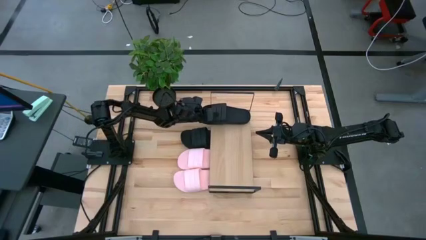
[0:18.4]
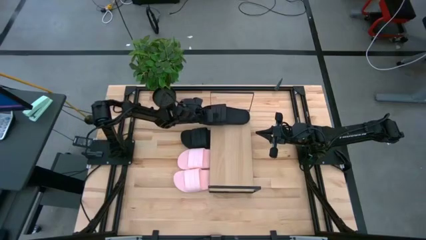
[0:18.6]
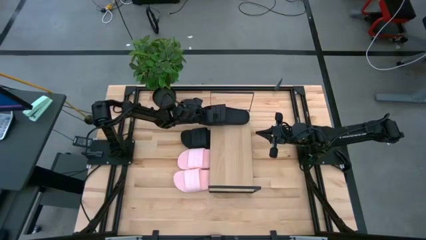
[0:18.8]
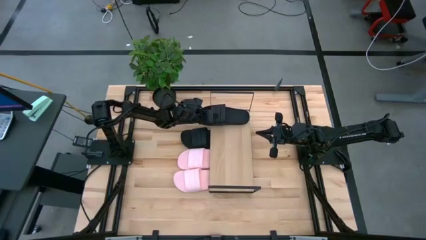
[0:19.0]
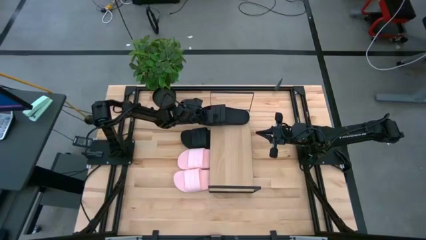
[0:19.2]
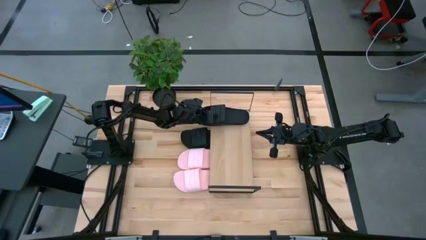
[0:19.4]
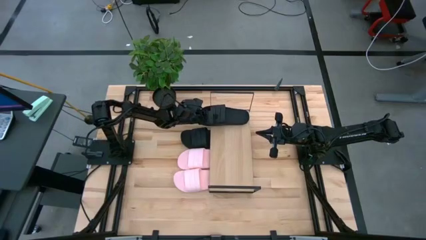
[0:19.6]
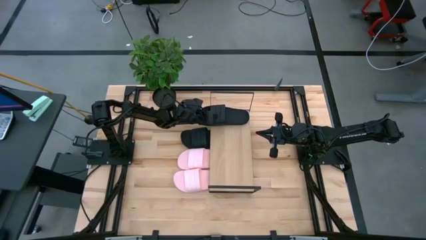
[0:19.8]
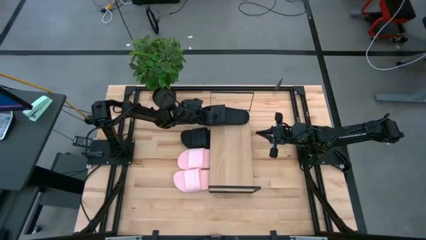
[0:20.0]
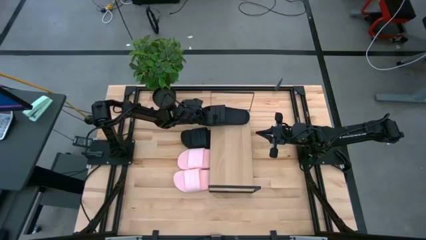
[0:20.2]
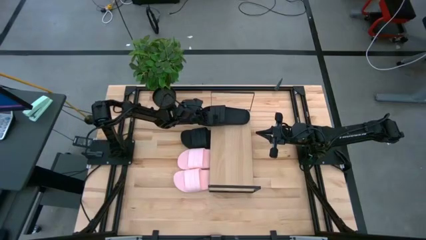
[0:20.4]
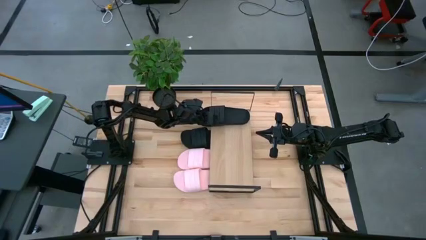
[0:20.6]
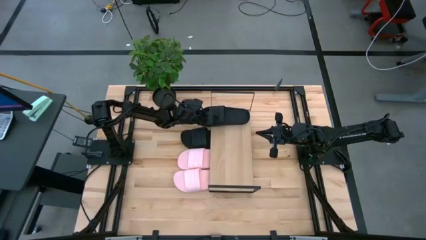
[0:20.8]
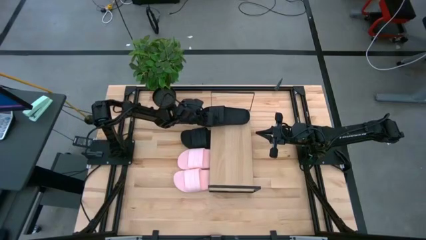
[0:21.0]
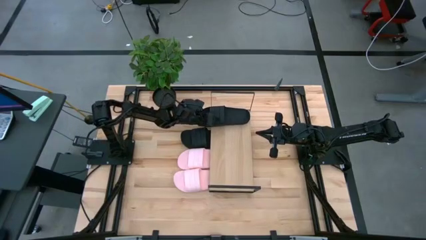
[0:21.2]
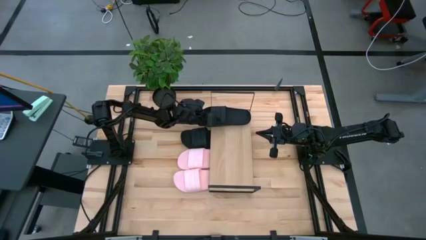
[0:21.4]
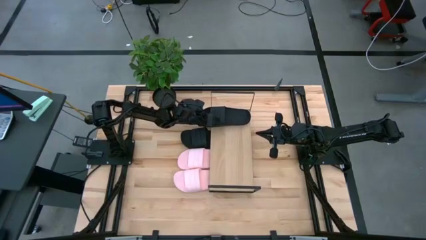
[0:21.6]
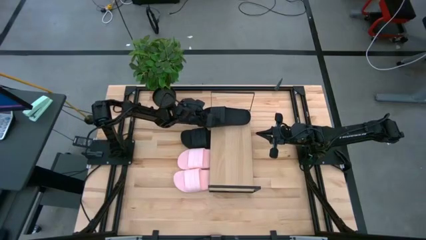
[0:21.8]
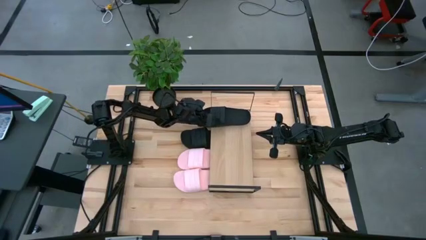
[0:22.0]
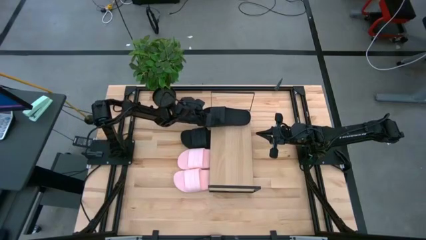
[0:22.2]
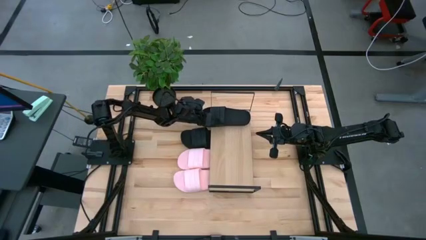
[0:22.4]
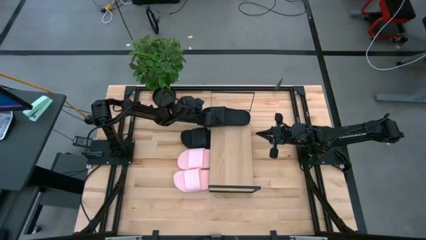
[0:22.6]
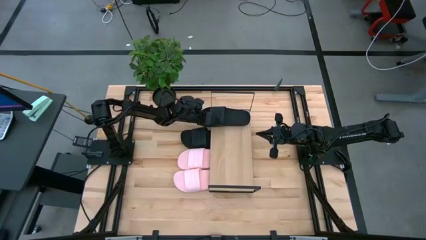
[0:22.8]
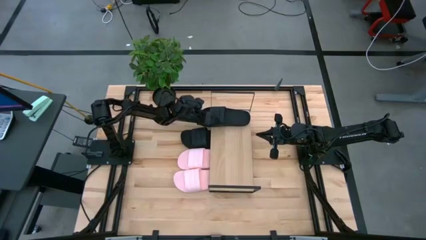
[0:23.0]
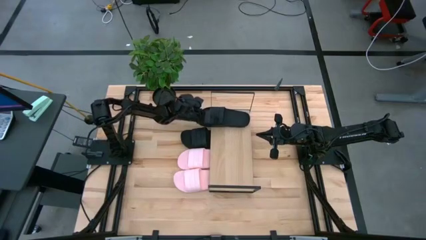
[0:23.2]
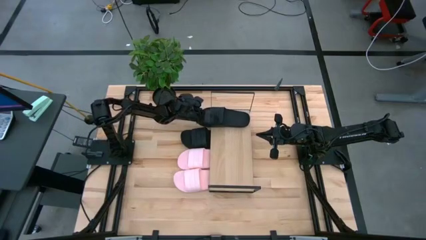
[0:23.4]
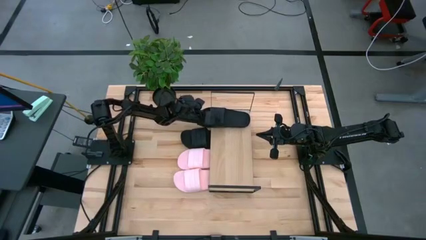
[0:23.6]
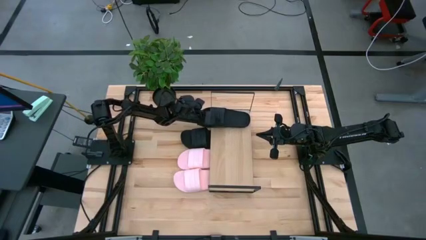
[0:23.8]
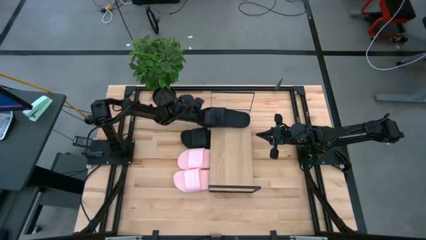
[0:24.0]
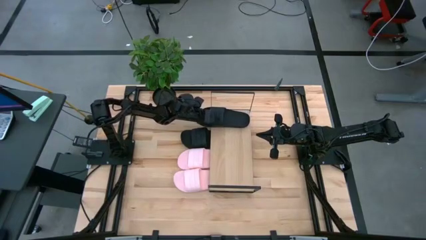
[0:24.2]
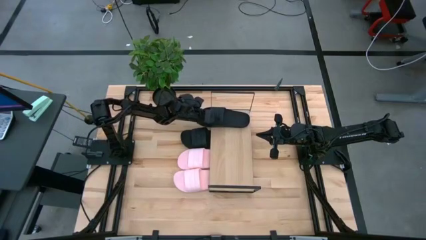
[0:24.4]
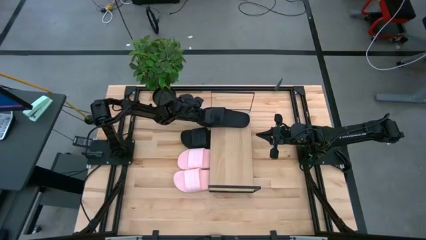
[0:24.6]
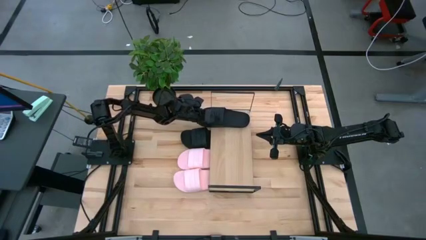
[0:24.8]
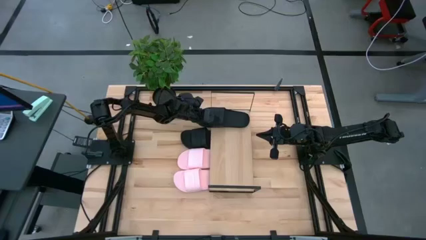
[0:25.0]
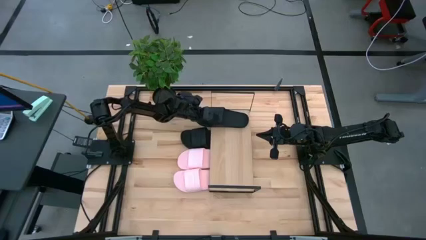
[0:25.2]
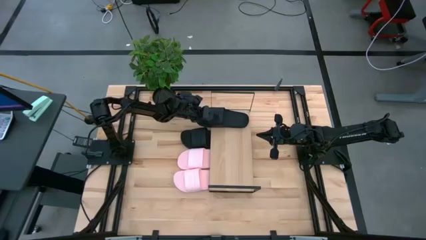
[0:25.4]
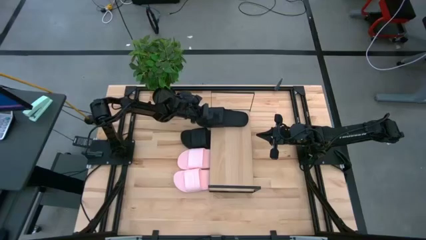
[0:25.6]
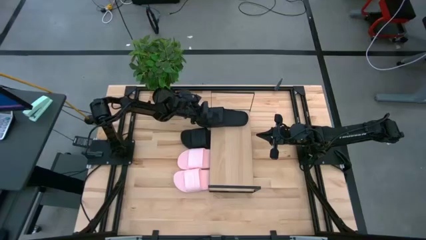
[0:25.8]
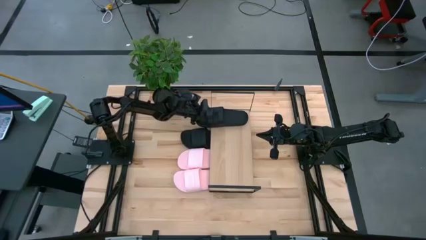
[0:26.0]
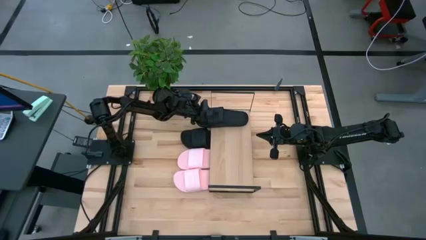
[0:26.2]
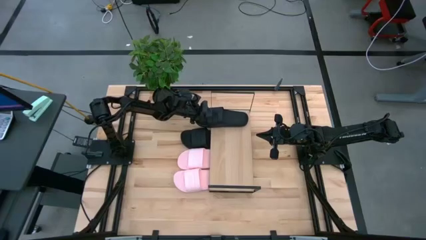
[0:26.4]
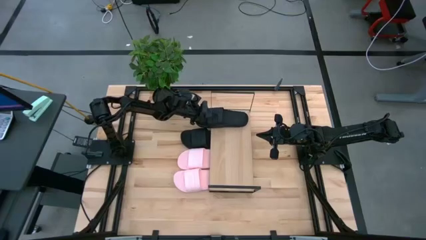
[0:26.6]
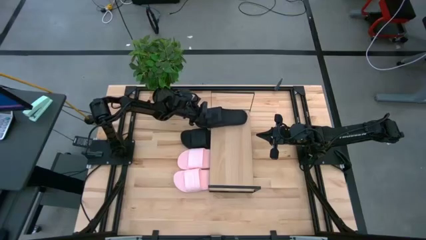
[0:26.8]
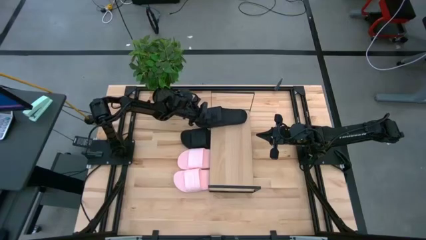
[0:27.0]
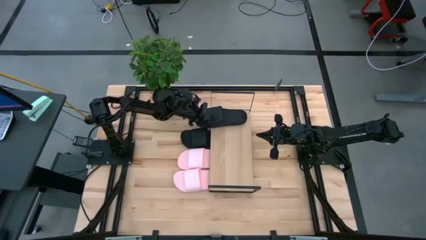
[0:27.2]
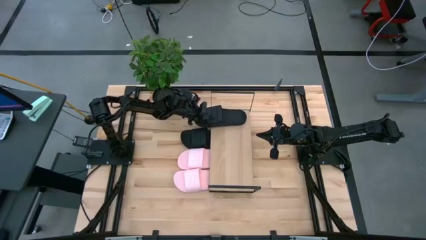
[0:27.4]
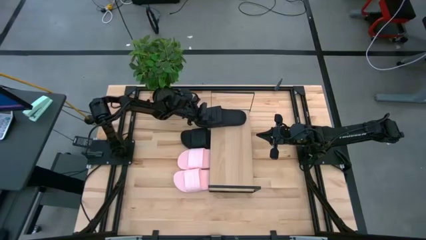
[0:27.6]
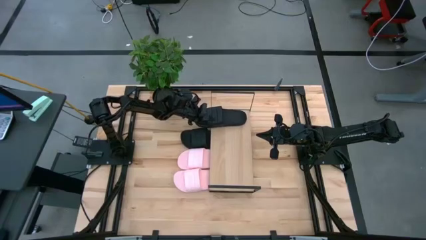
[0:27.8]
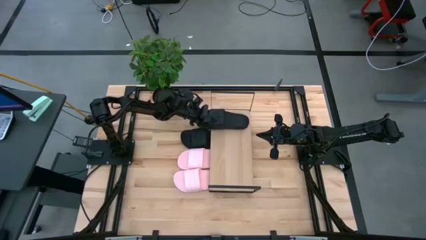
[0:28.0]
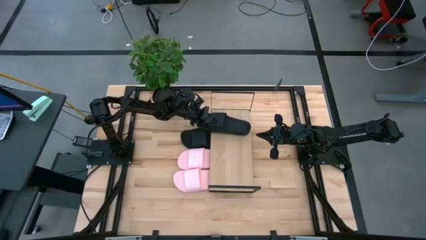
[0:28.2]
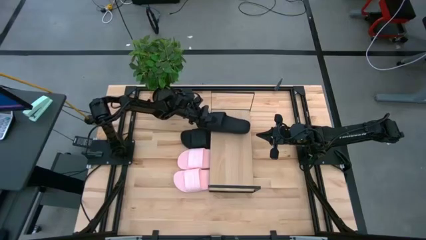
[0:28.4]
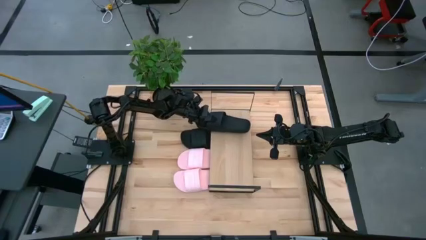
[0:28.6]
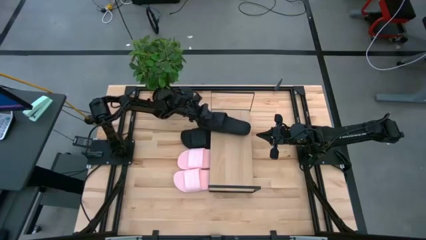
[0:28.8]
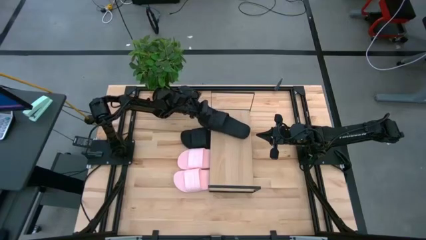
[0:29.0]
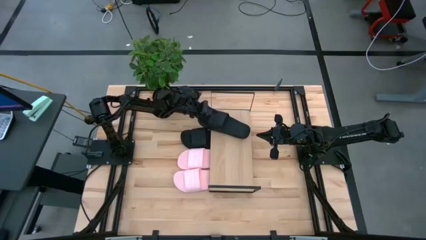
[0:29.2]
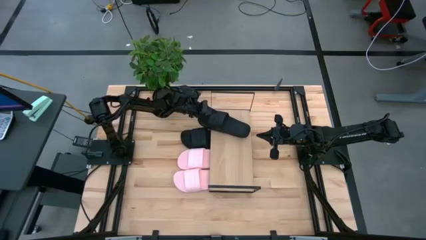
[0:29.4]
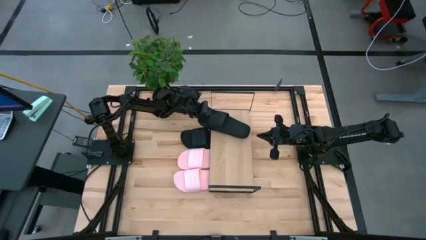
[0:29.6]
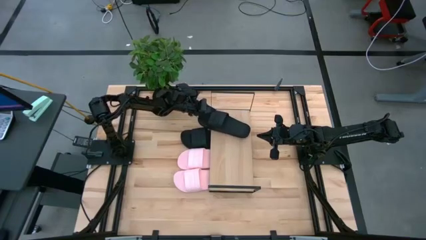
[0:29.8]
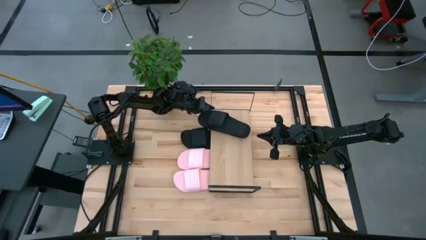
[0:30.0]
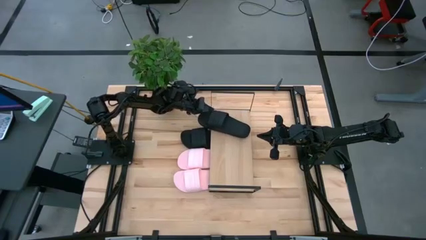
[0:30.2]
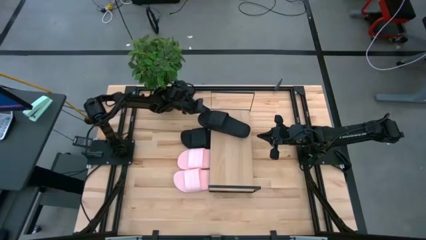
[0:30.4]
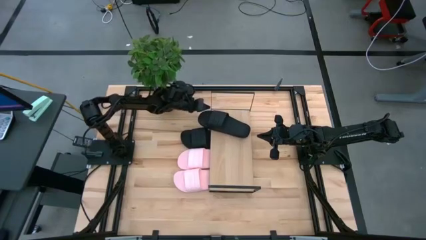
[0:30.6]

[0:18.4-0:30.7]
Task: Pick and place slides into the shelf
Put the top black slides on the shelf

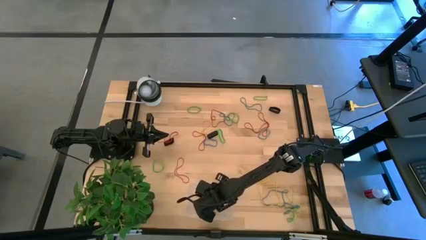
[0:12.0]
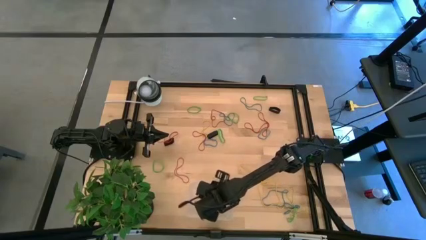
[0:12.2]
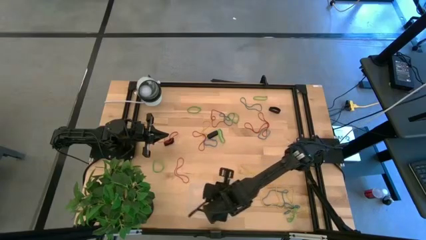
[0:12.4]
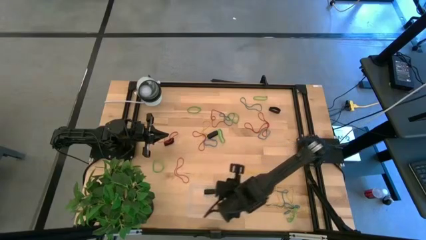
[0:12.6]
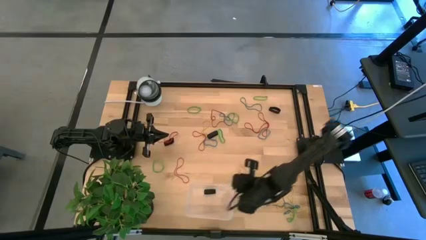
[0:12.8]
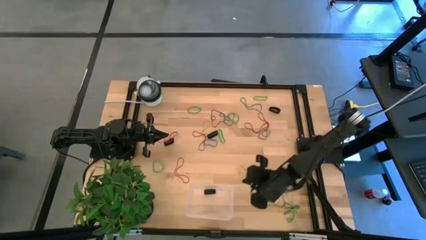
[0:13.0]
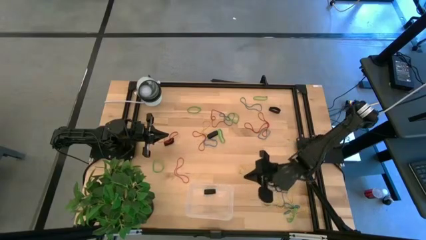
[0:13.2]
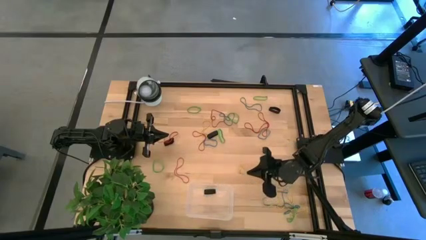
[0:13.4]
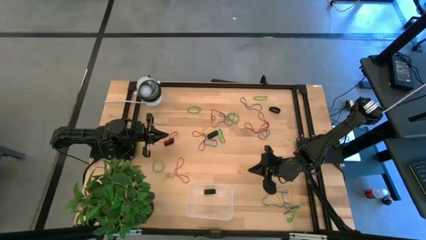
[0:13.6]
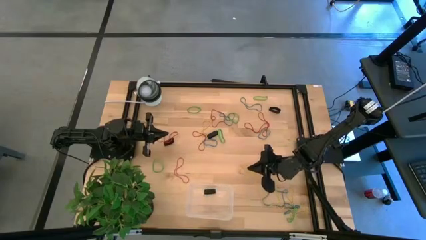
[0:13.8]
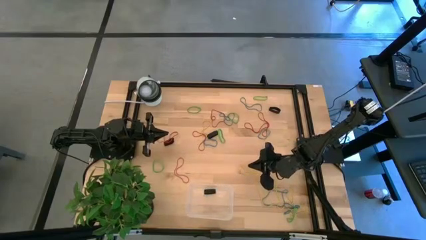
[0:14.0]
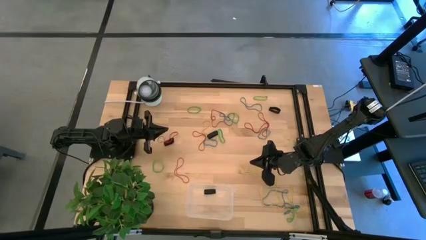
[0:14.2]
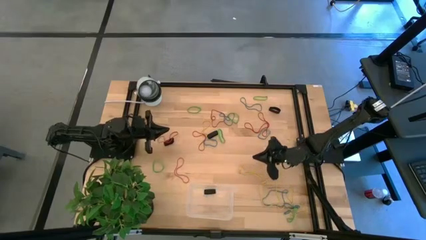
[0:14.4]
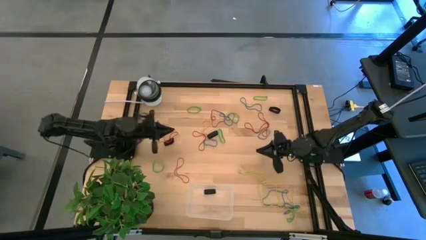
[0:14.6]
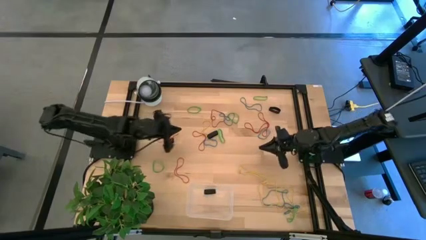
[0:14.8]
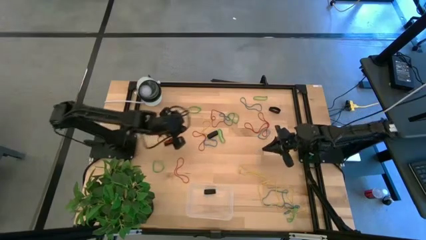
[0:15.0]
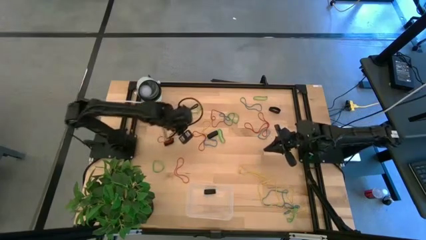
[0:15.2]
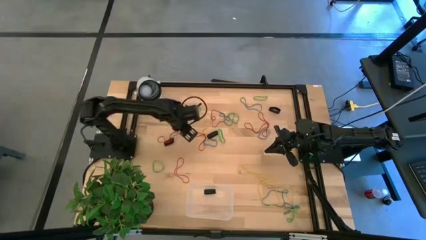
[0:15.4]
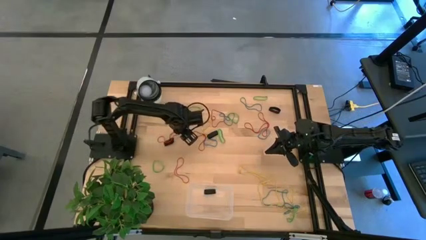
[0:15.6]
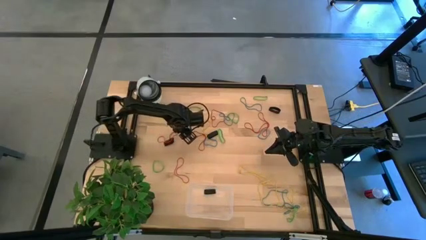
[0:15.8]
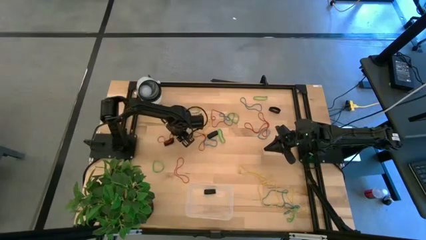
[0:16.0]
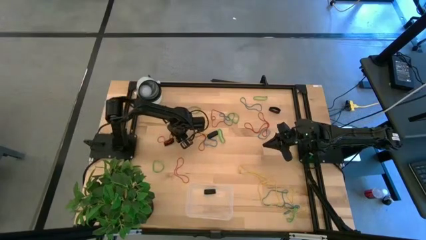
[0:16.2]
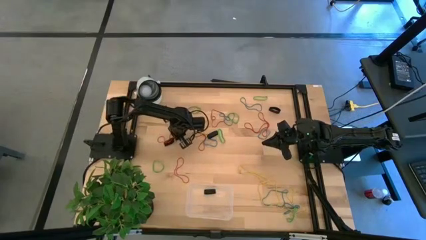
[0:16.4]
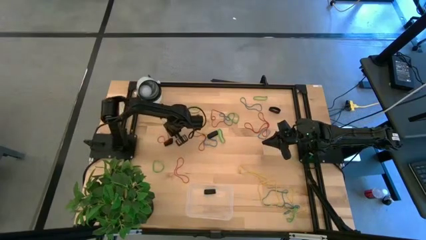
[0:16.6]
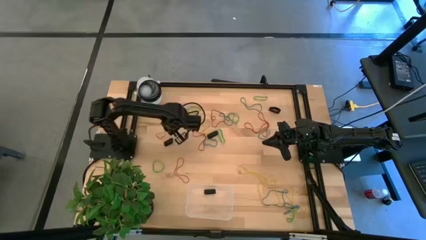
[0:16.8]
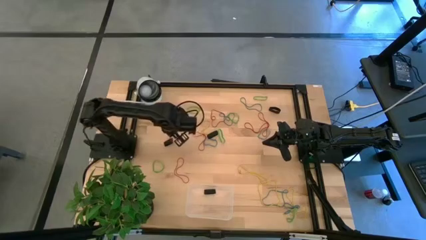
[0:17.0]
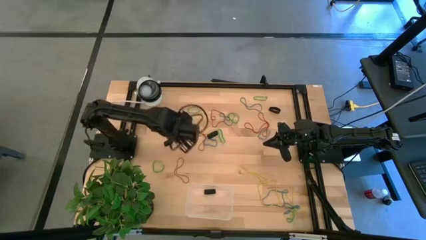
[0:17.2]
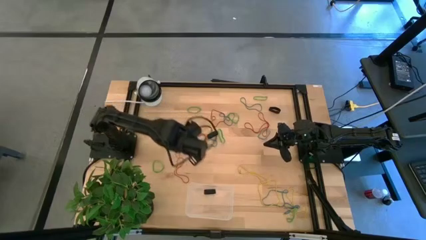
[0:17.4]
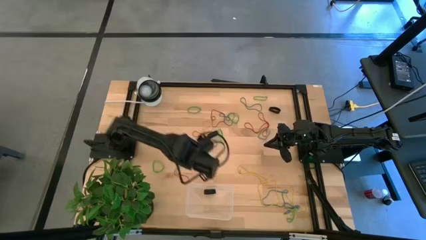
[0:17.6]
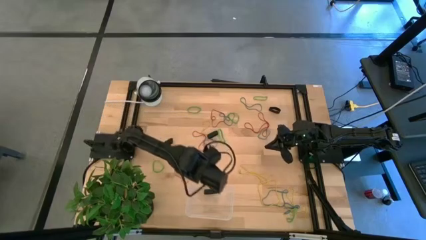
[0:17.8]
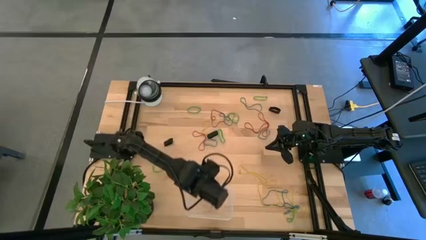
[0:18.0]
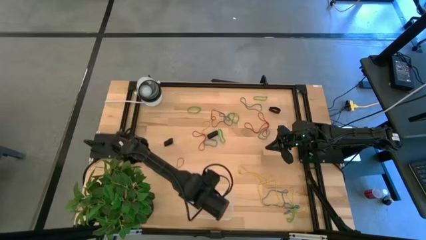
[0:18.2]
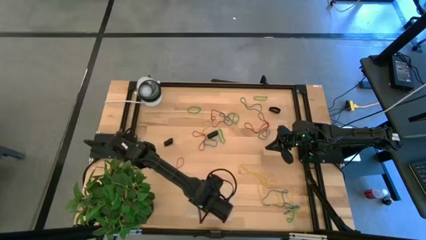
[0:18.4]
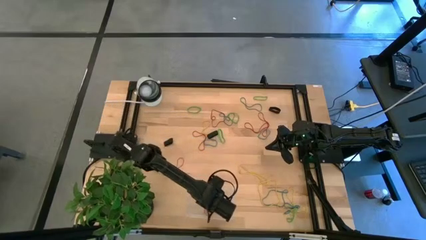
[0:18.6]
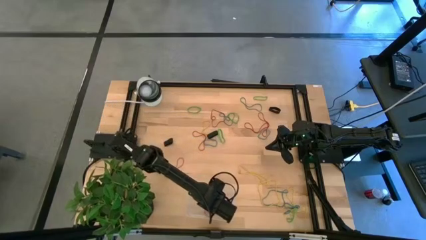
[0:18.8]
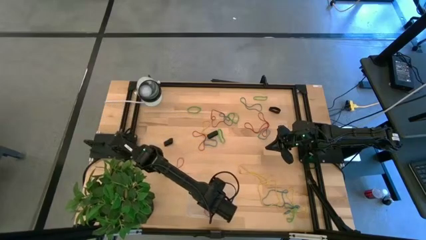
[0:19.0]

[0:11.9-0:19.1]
Task: Pick and place rubber bands into bin
Put the red rubber band into the transparent bin
